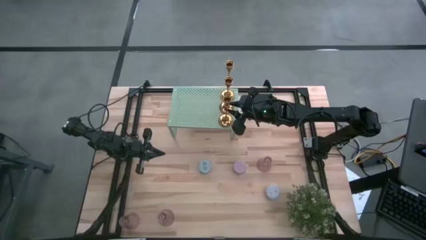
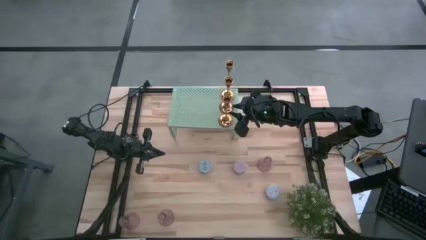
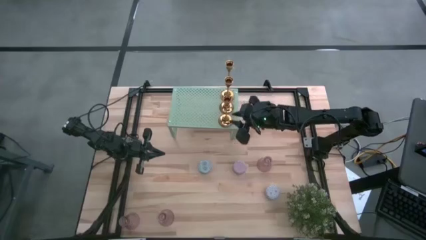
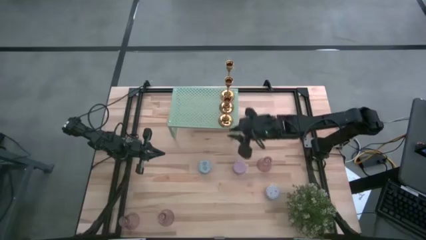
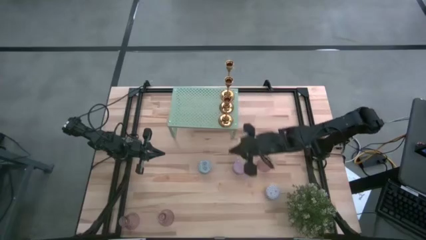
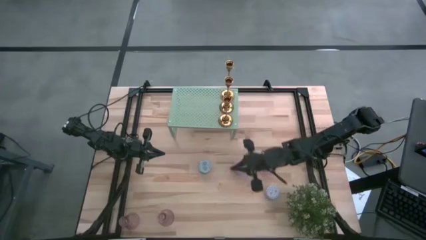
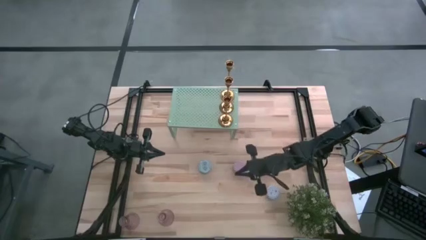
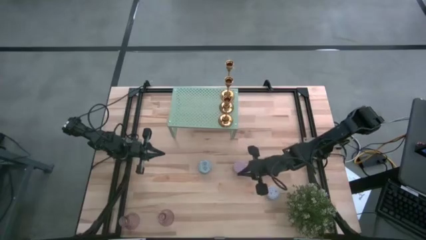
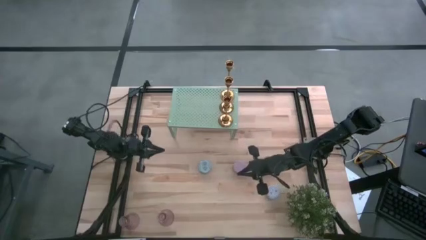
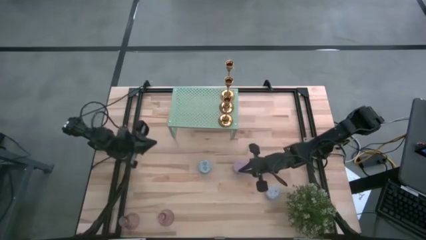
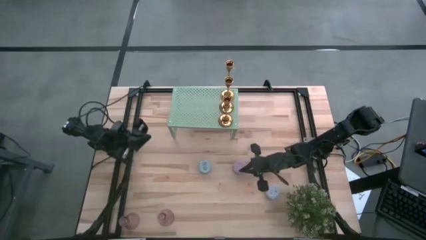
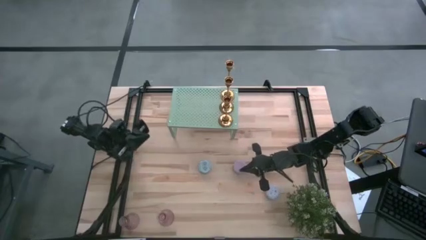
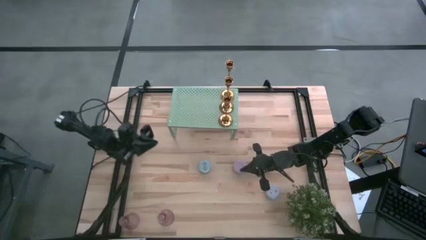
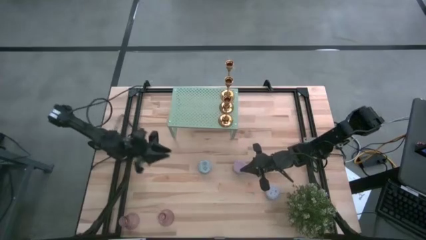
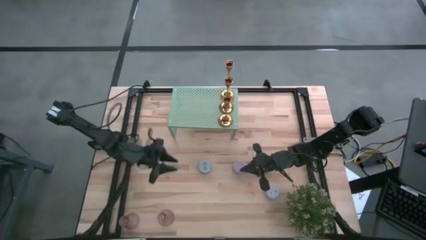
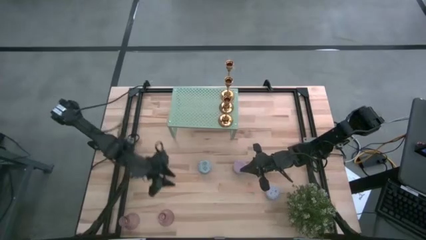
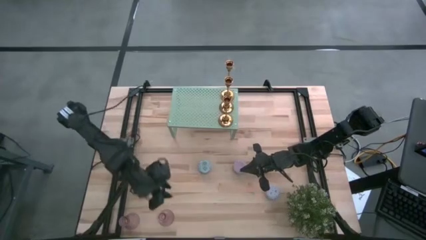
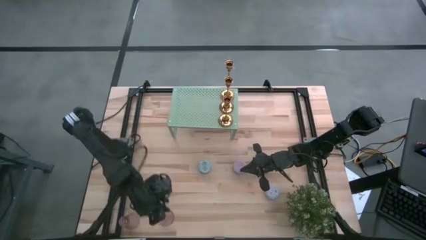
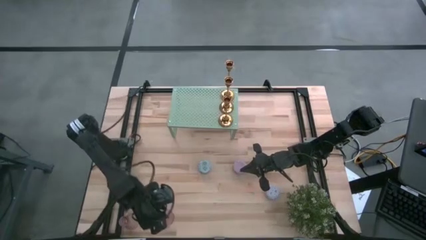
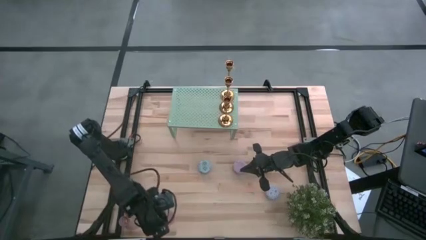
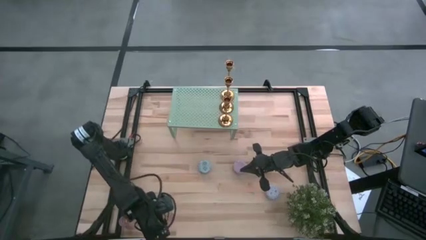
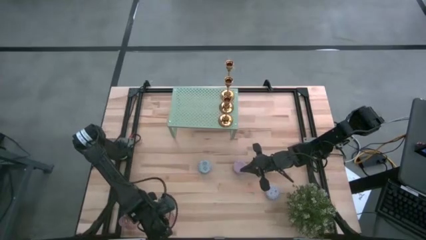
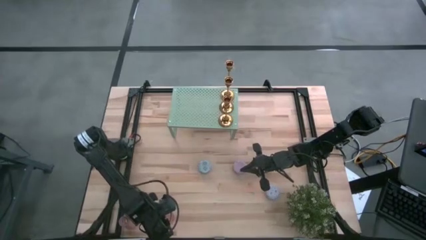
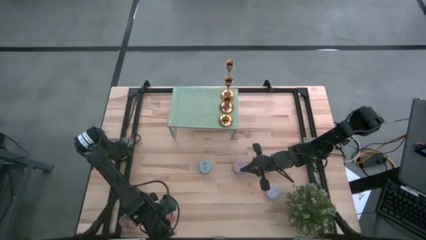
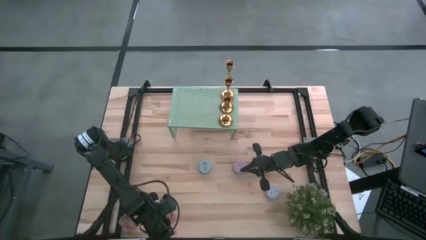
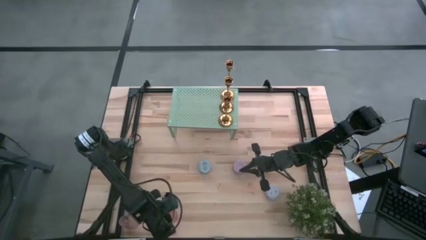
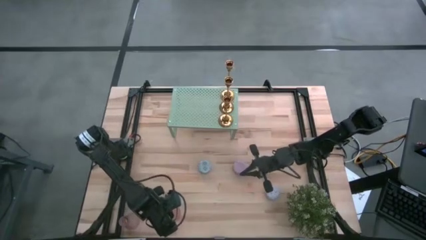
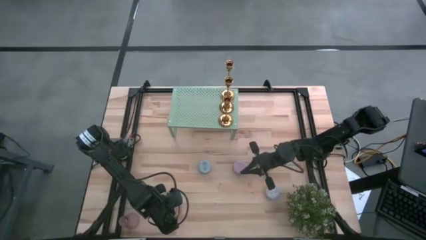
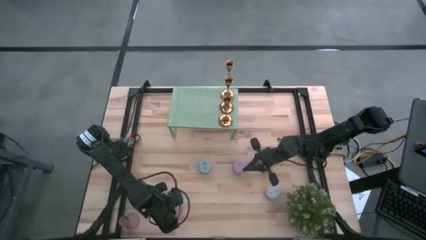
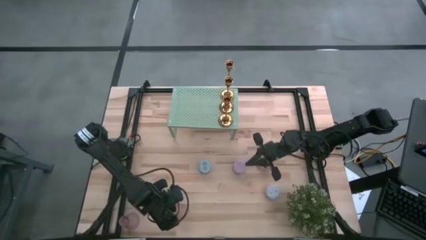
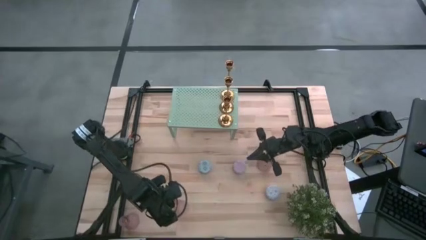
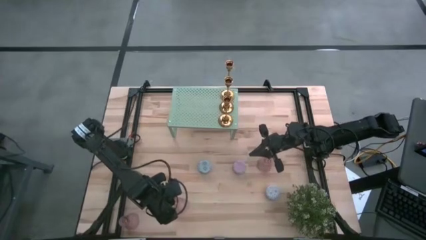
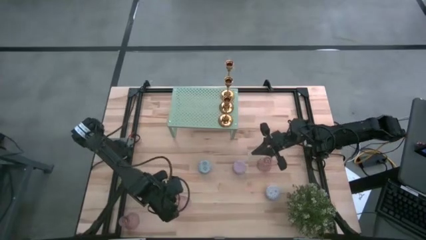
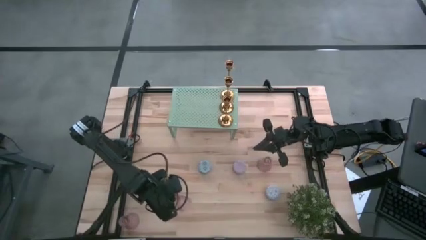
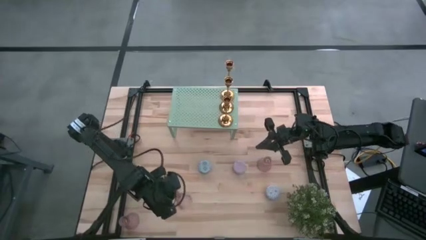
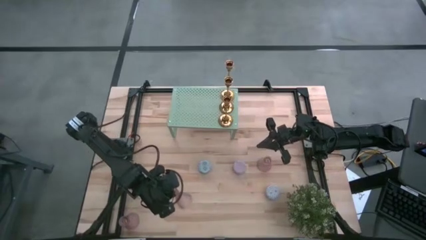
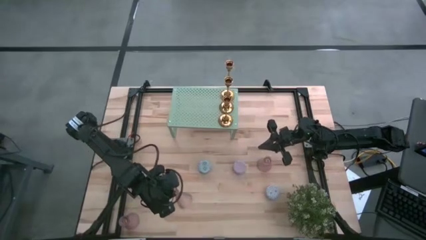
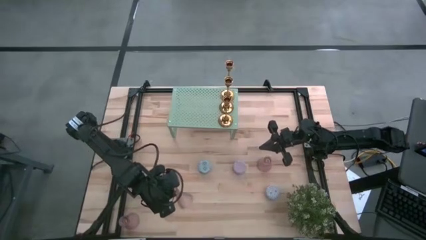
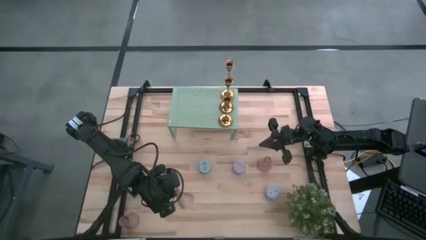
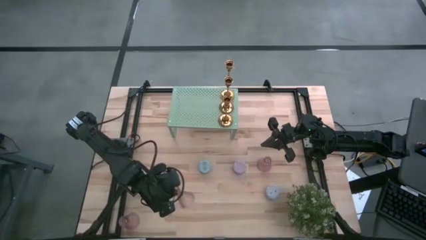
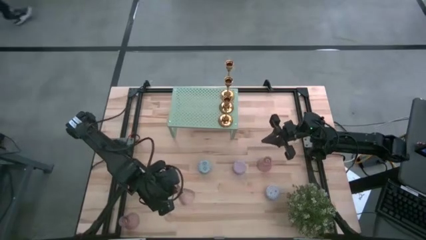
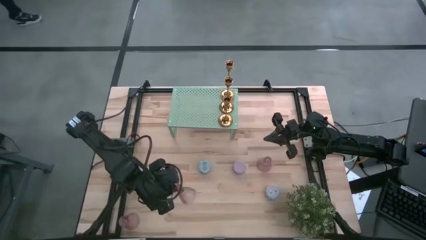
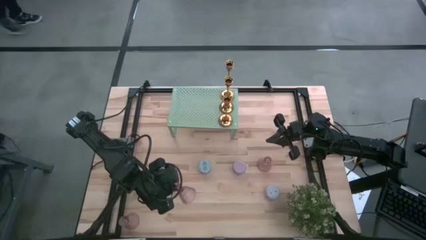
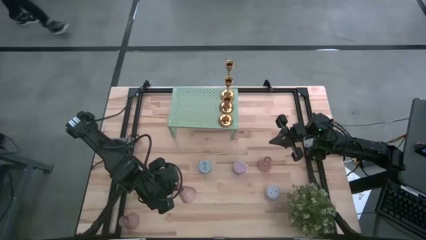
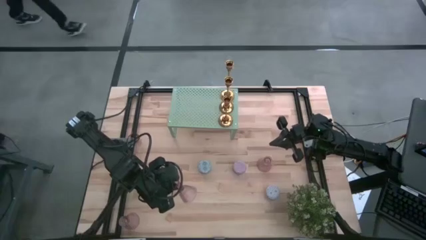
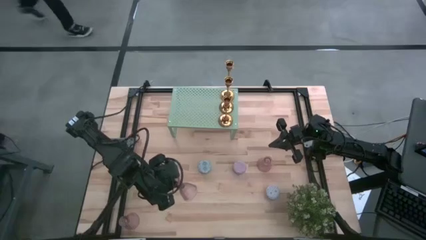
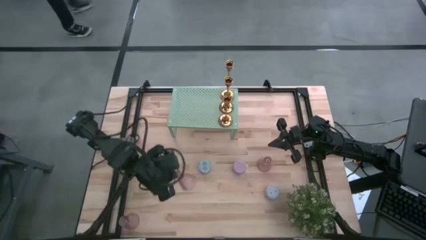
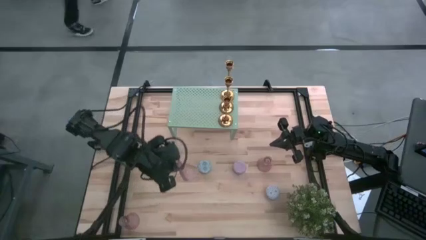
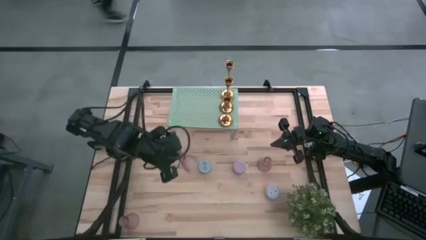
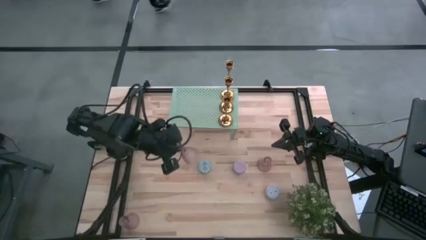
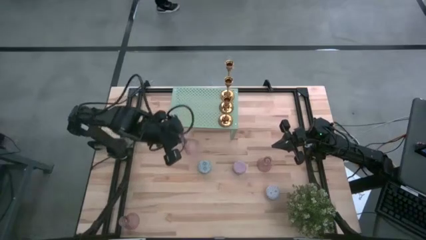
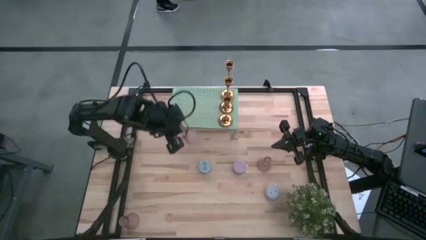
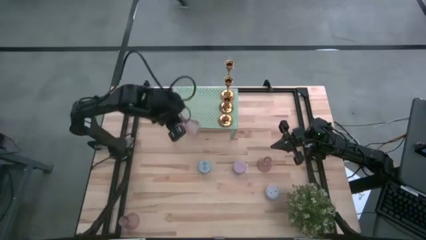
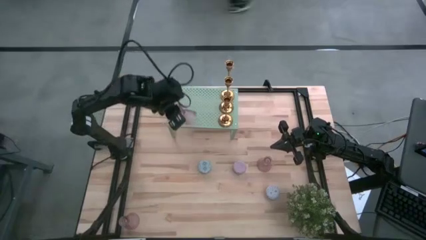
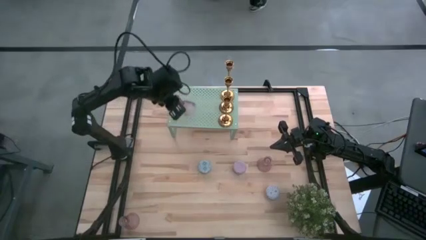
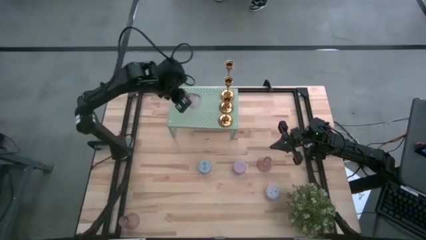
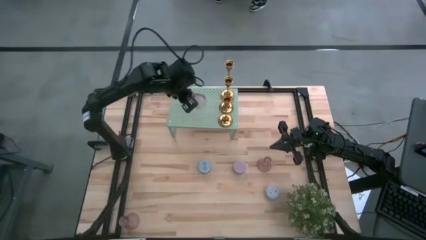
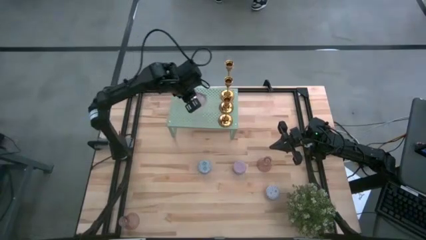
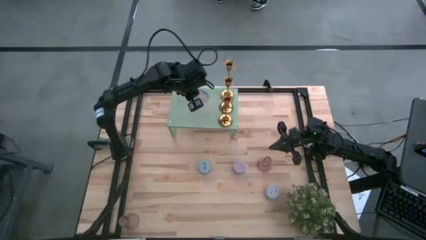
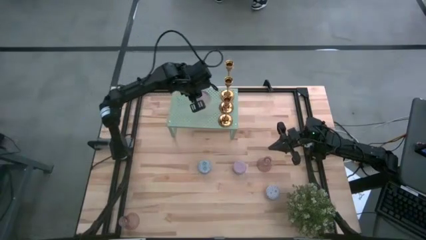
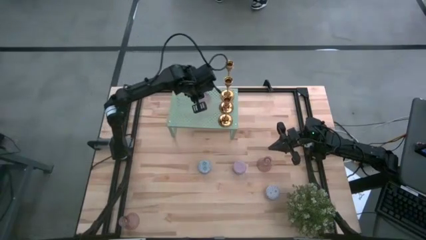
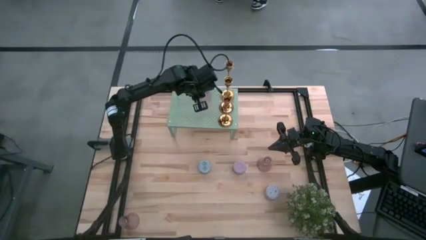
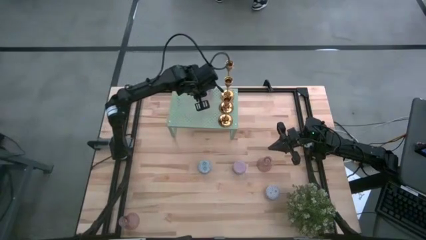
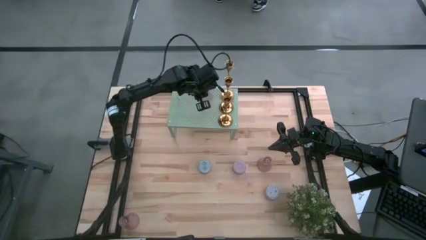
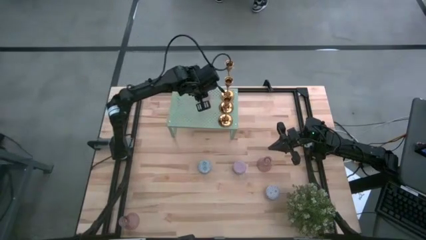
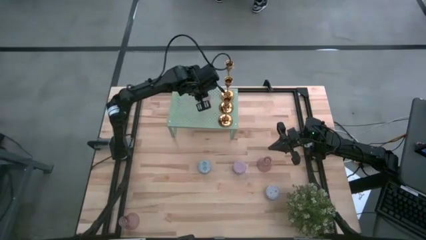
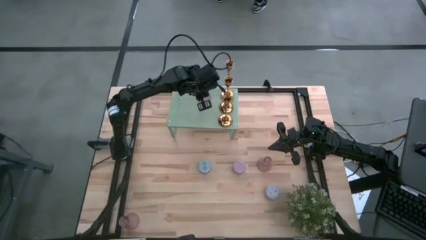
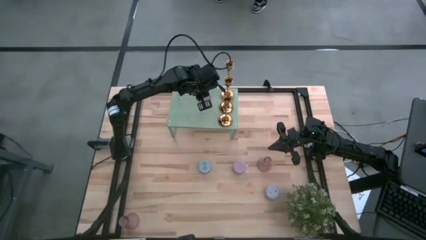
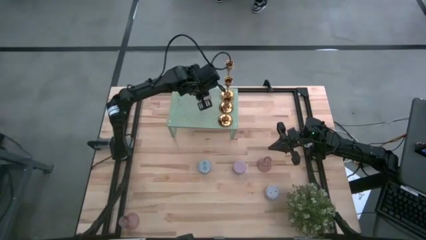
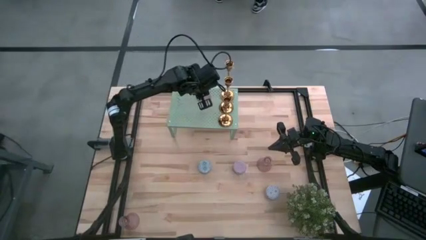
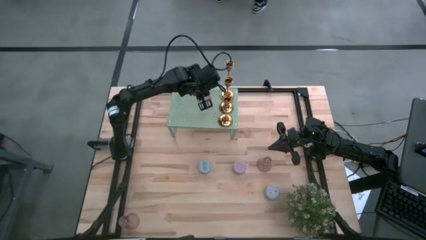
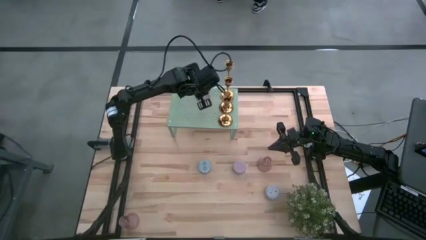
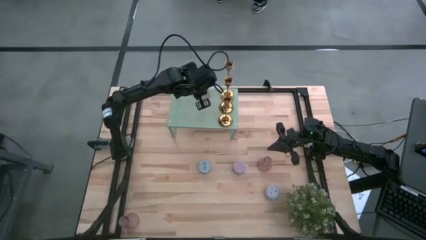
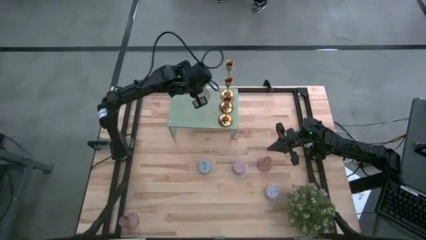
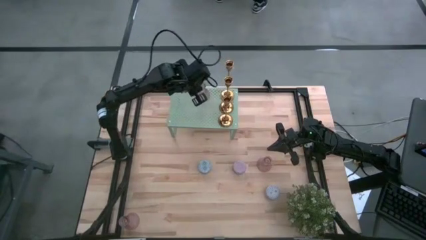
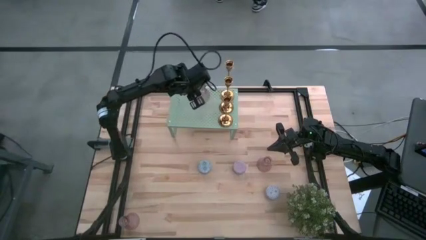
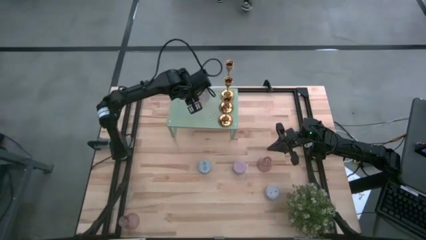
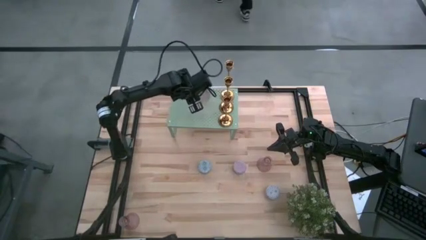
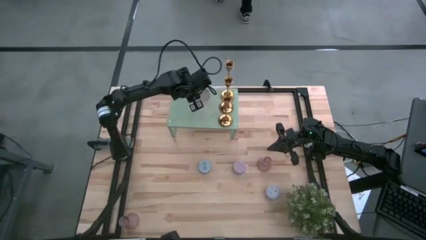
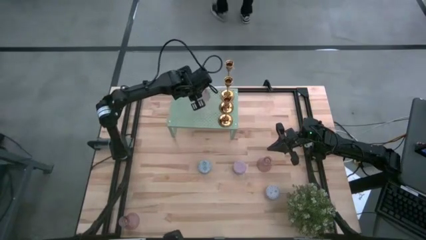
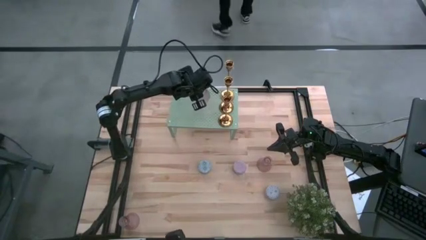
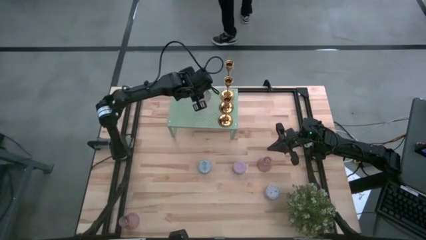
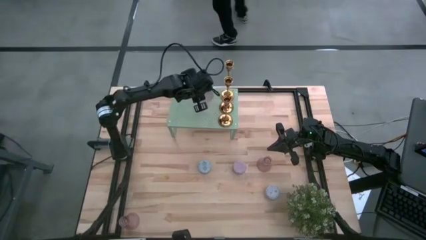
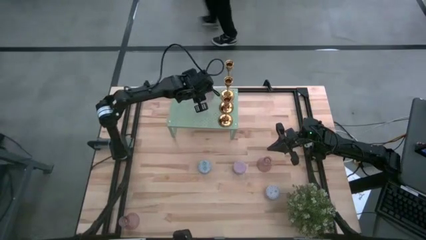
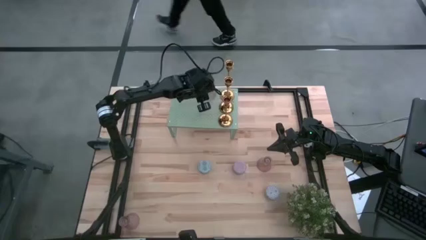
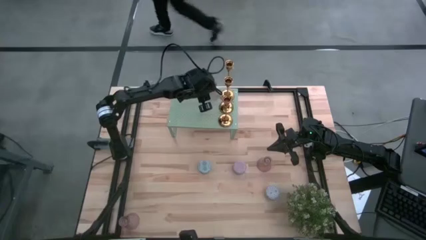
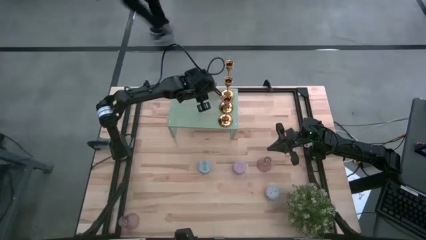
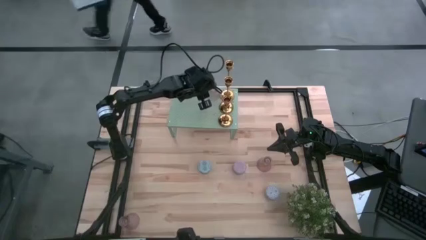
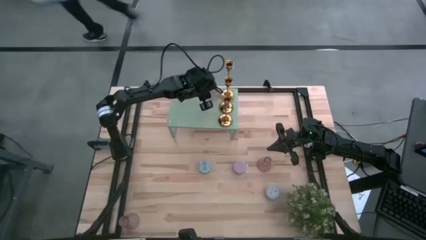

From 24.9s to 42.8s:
Task: Pick & Place candle stick holders
Put the bottom right purple candle holder on the shelf
